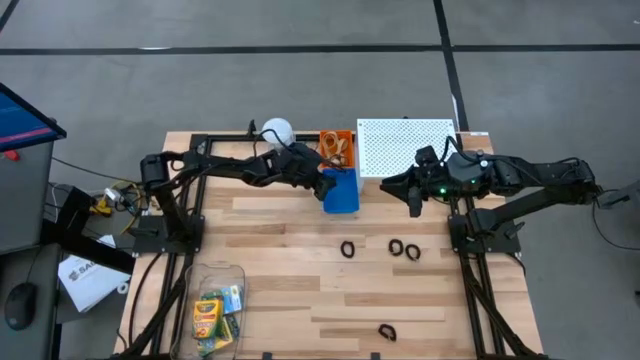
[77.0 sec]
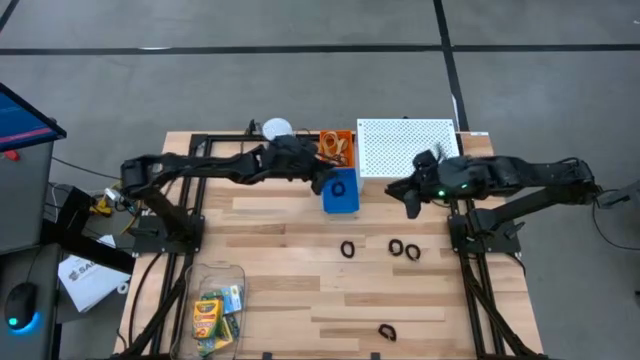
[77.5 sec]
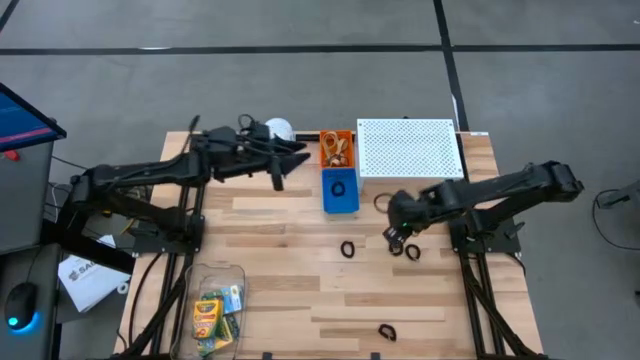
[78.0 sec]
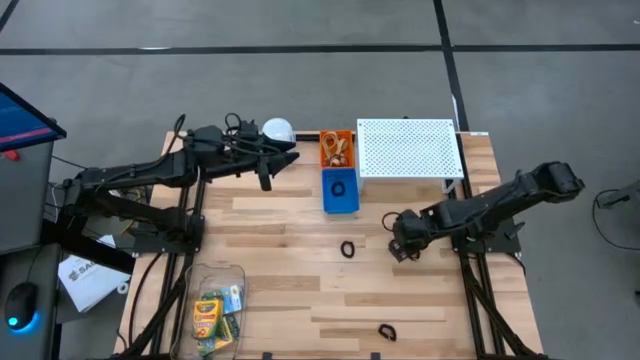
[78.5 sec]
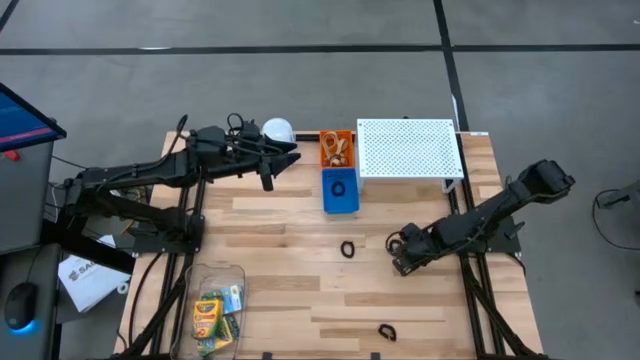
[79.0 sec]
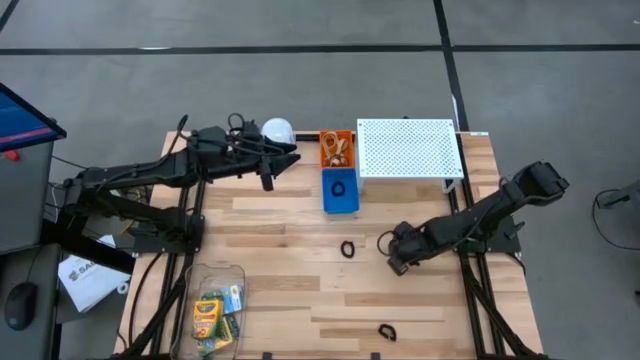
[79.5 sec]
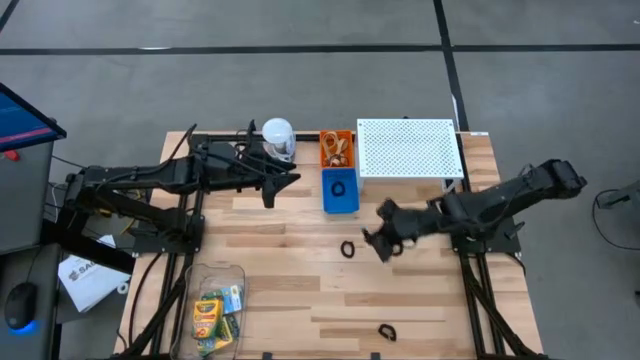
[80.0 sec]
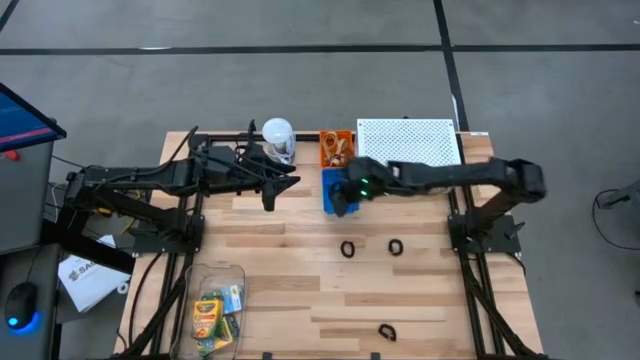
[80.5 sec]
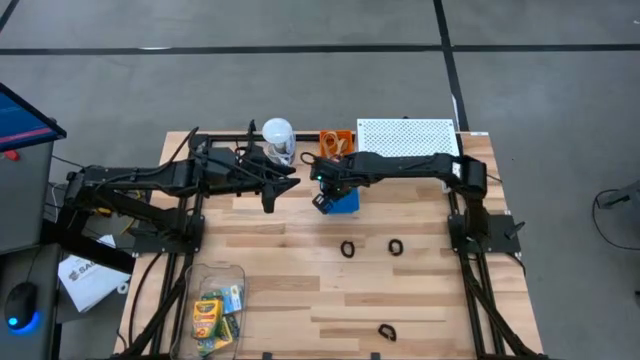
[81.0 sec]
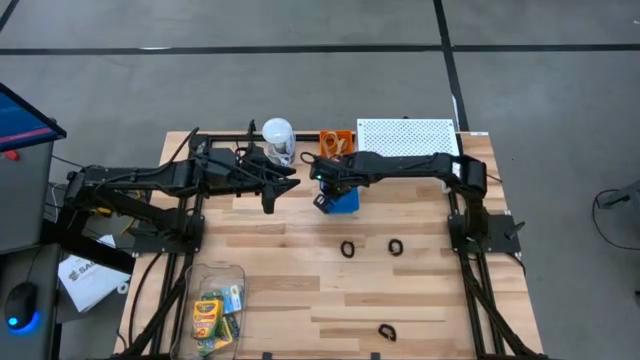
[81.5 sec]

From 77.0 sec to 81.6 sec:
Task: Pick & Place Office Desk Supplies
Put the black spring keychain into the blue basket

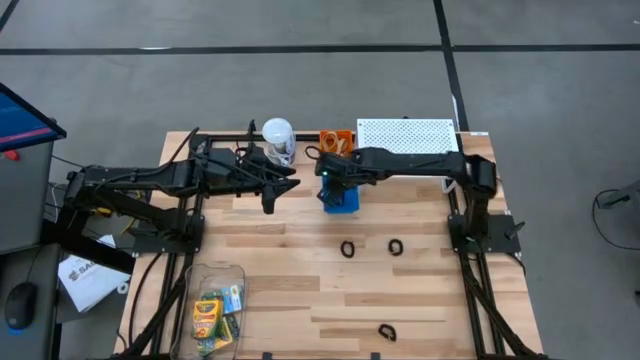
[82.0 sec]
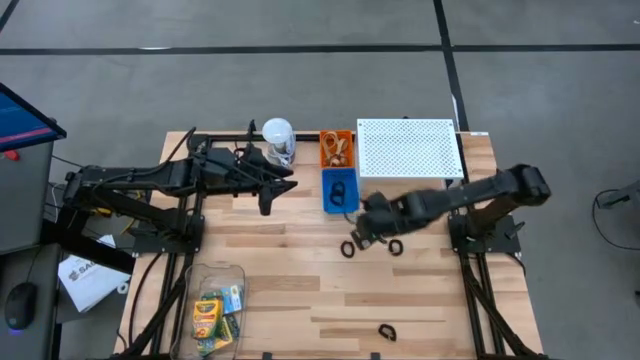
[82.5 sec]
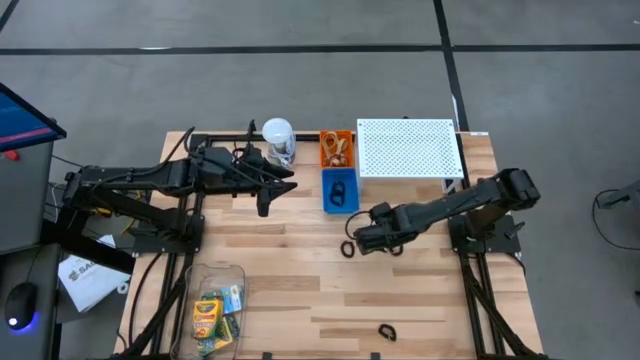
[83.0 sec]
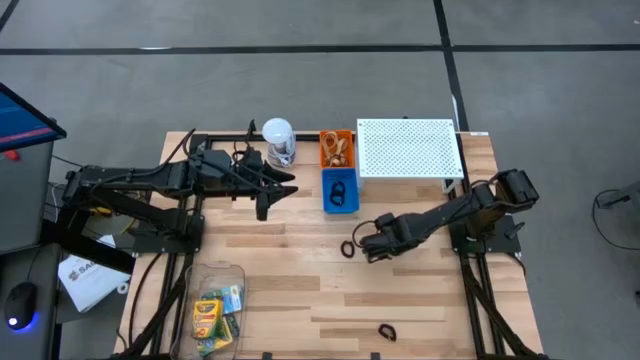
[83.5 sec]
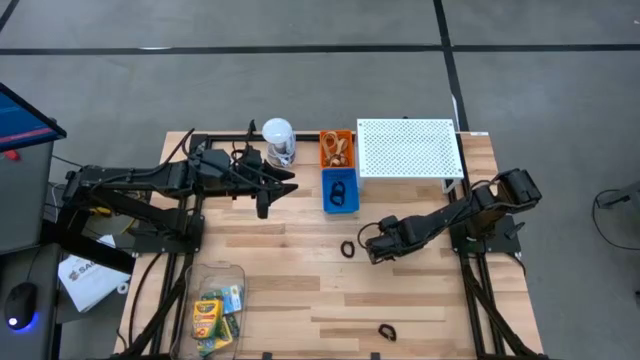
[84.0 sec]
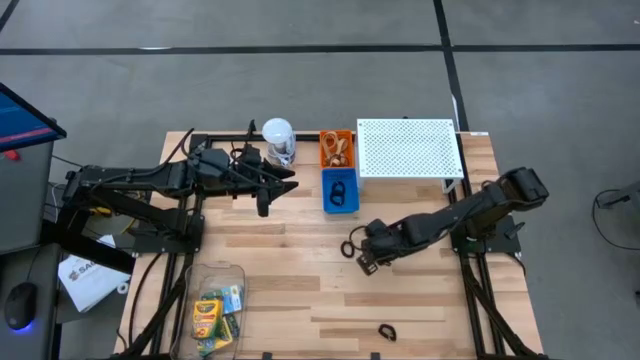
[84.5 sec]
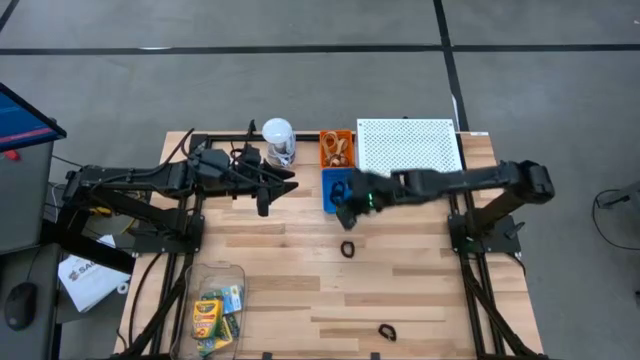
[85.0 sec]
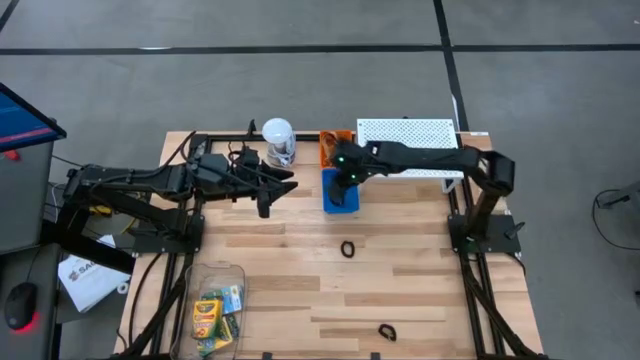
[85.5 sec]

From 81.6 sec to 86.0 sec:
Put the black spring keychain into the blue basket

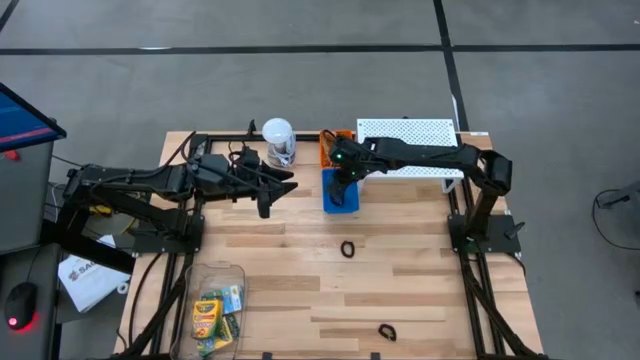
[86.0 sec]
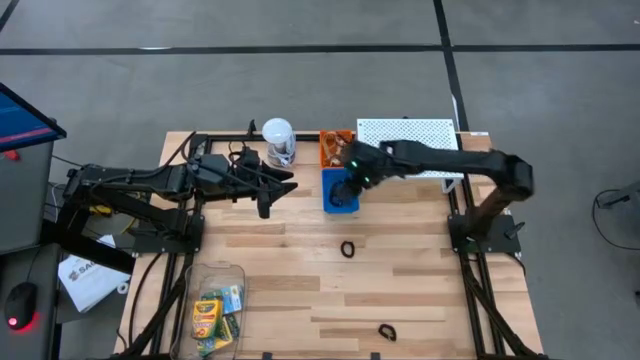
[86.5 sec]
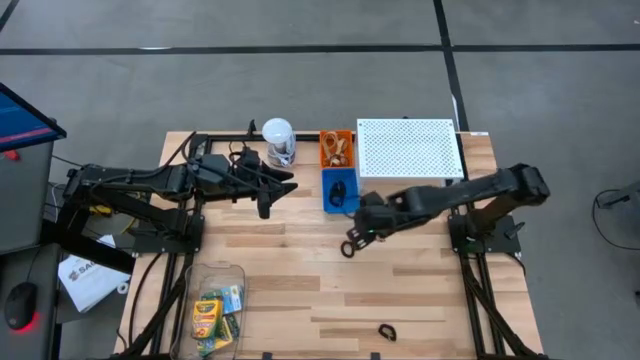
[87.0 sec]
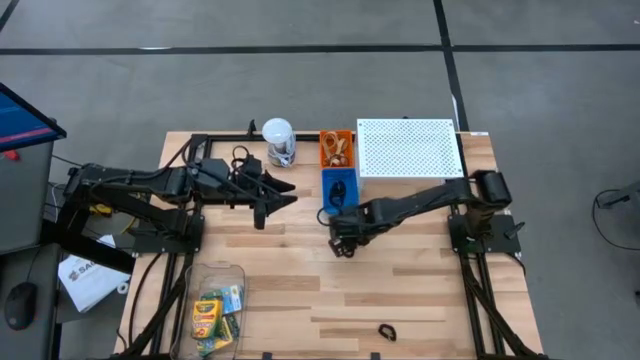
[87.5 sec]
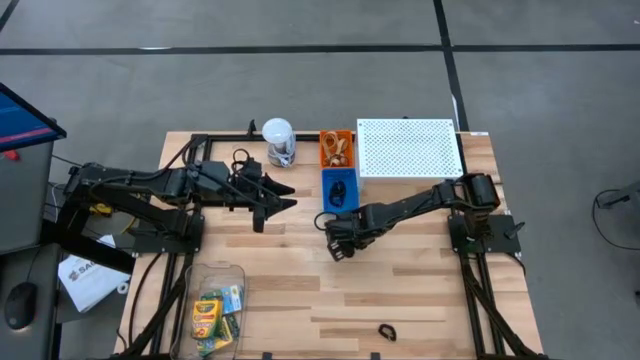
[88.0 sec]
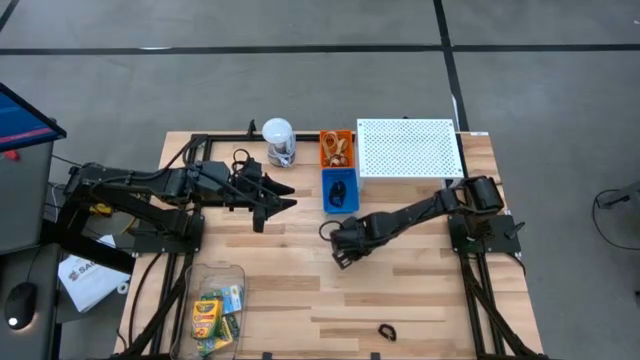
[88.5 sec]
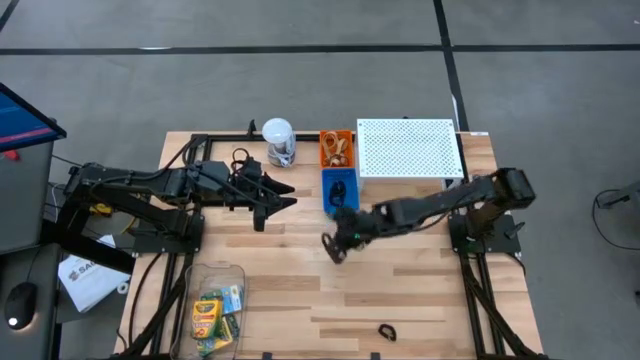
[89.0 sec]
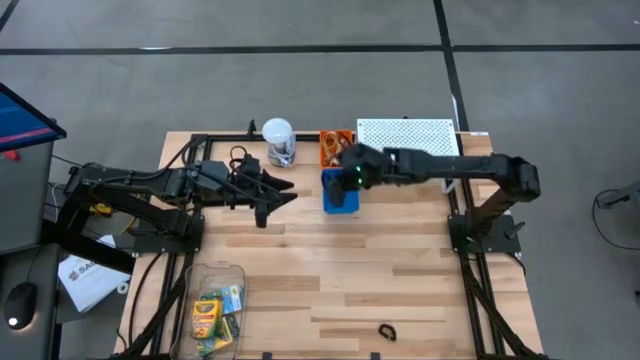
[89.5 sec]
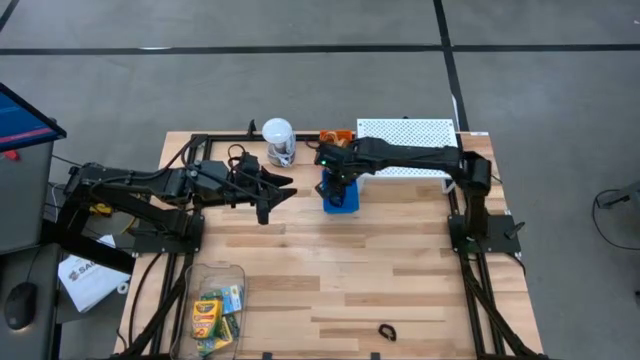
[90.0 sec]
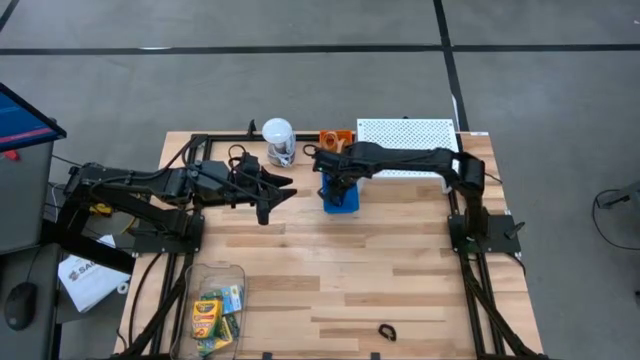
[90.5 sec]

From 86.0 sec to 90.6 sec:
Put the black spring keychain into the blue basket

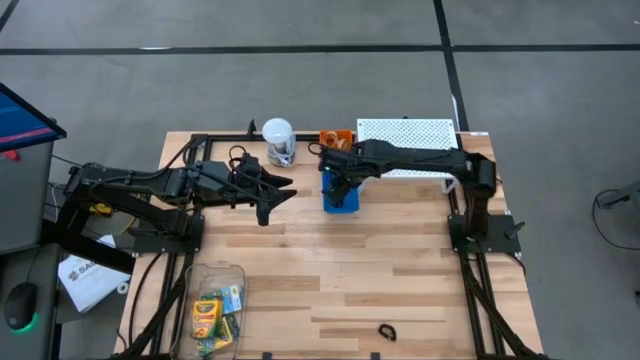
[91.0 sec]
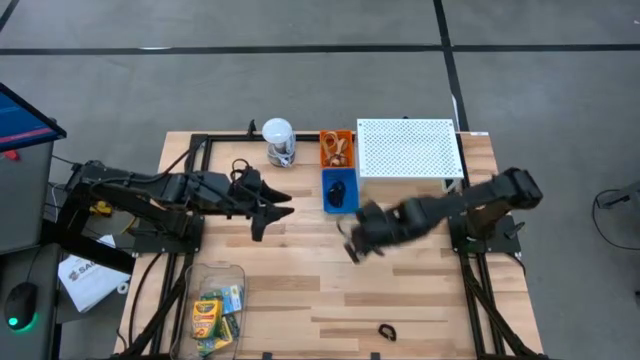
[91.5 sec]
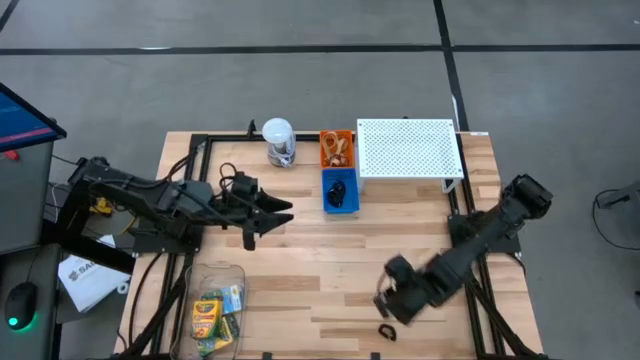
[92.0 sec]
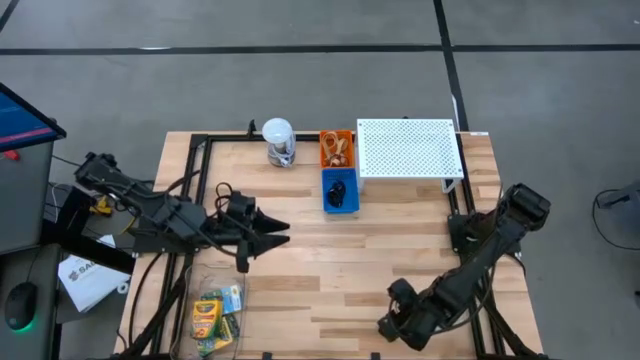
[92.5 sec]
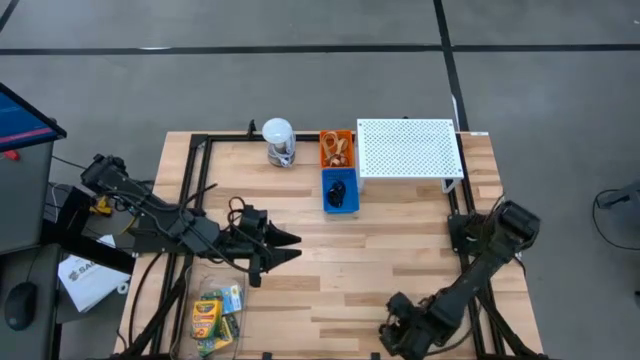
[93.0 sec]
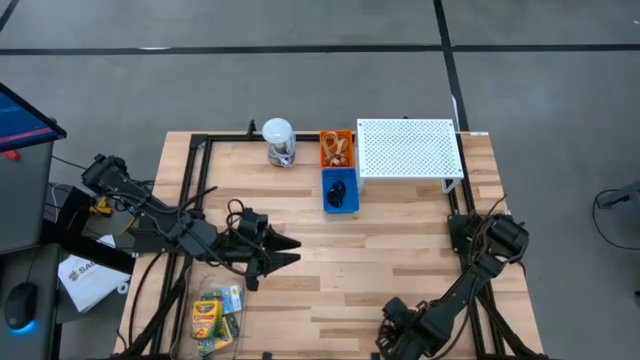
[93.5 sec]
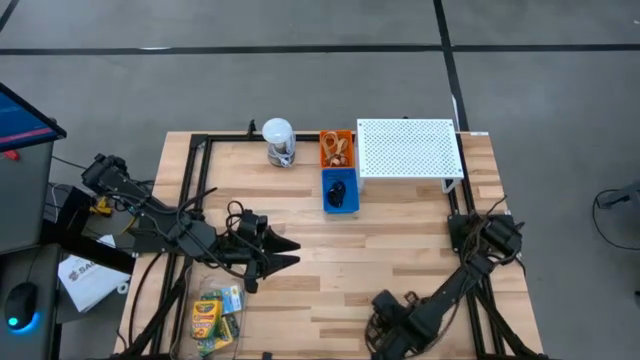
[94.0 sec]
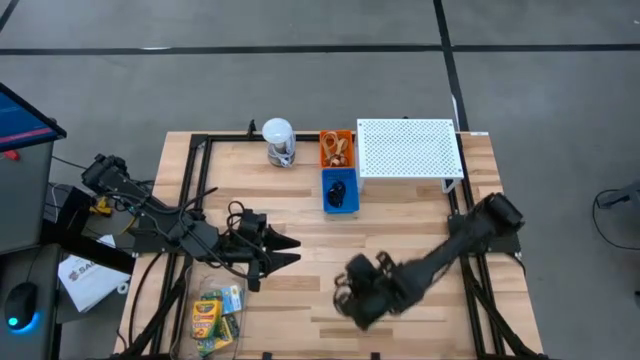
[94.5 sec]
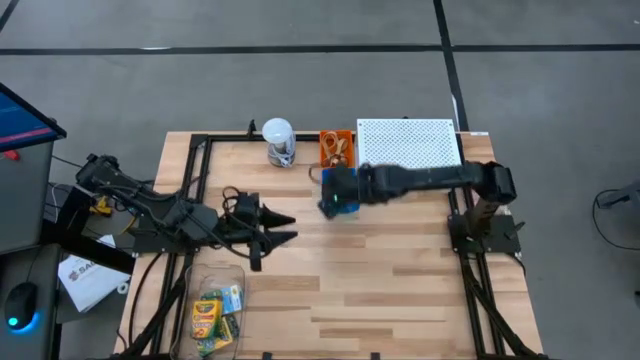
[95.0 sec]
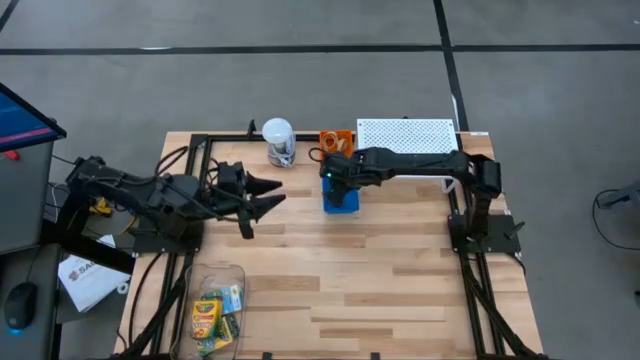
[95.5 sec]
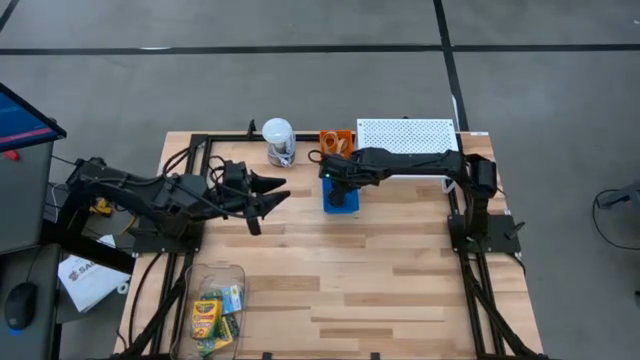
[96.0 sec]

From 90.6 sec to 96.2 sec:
Put the black spring keychain into the blue basket

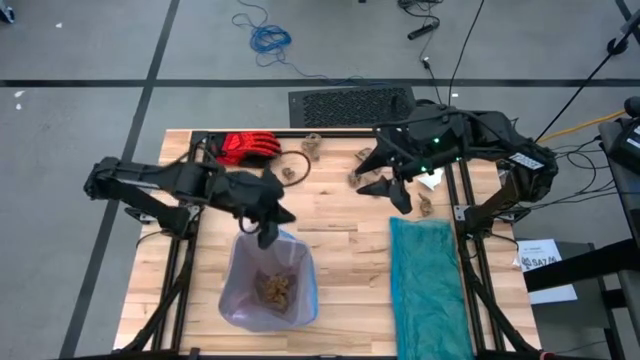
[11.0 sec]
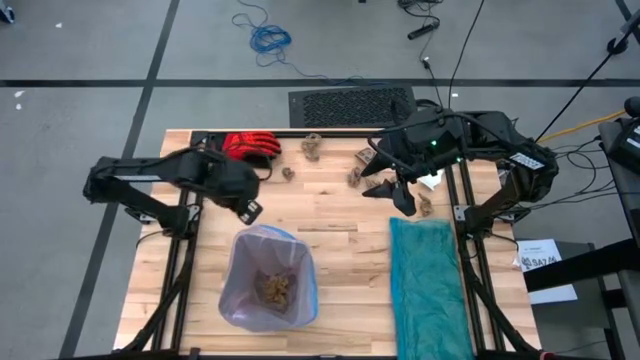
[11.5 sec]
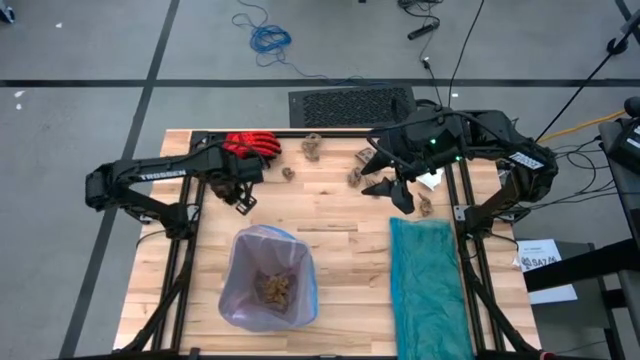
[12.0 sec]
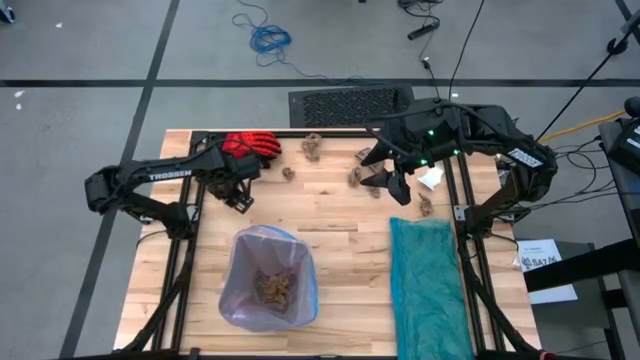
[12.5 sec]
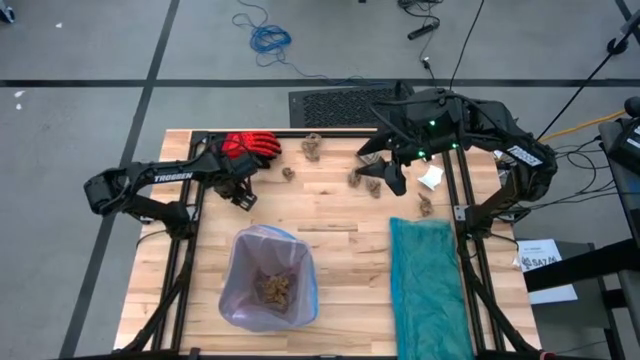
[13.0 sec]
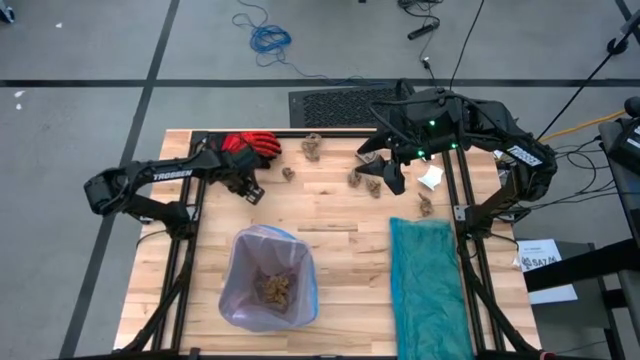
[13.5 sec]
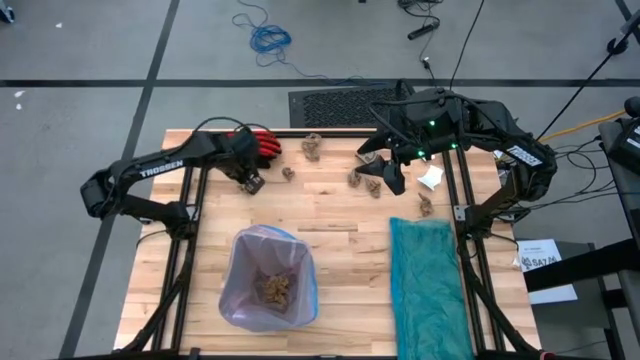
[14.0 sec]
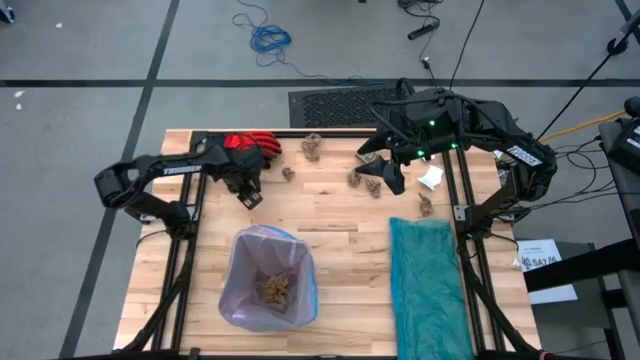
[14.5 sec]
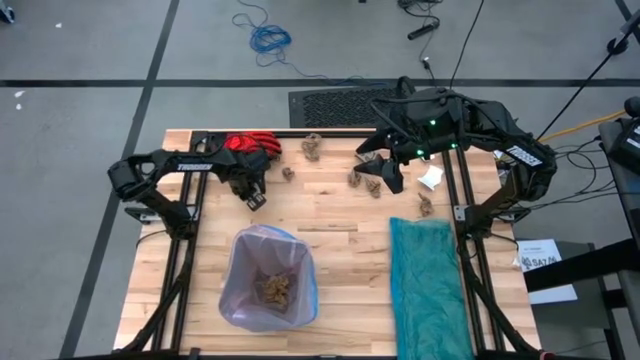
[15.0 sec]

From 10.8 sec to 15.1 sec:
Task: place trash/remove bag and relplace
Put the brown napkin into the trash bin
